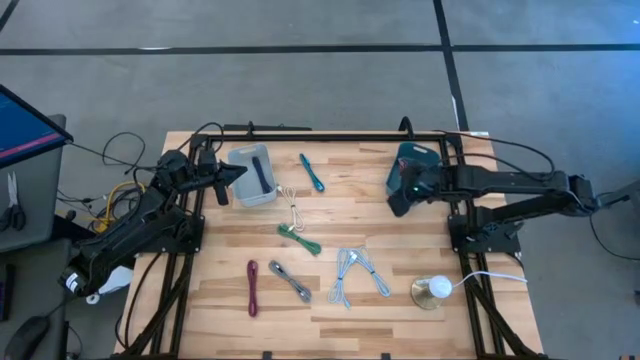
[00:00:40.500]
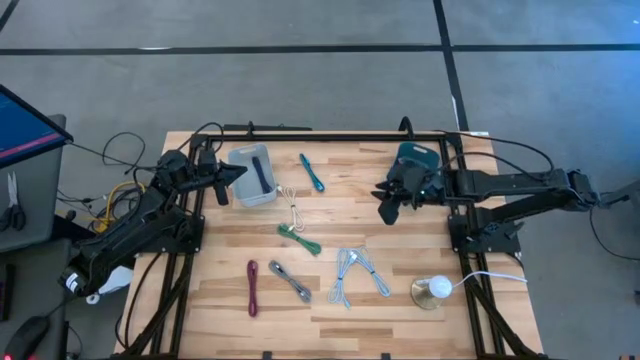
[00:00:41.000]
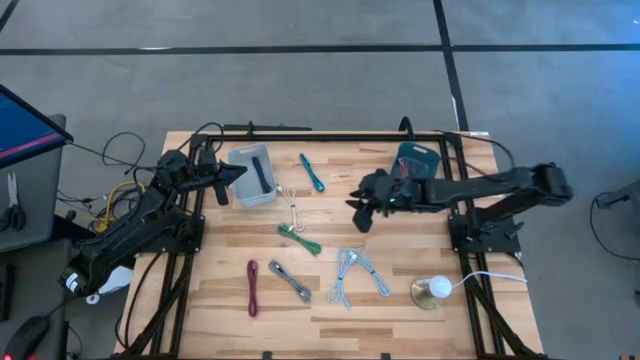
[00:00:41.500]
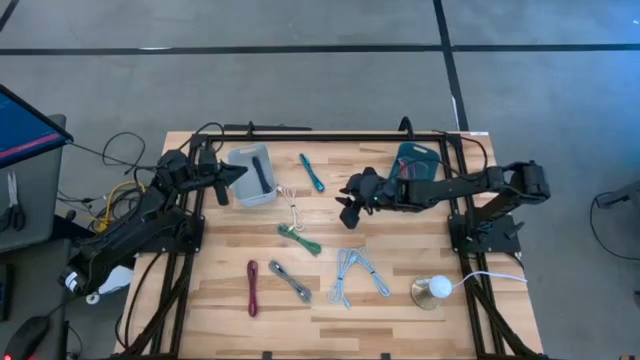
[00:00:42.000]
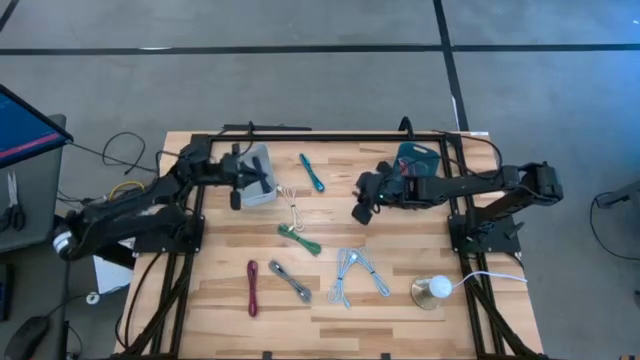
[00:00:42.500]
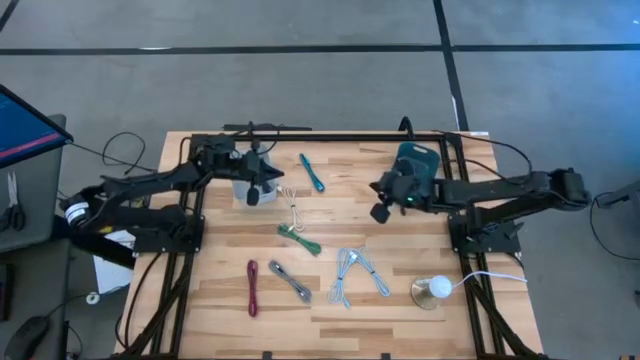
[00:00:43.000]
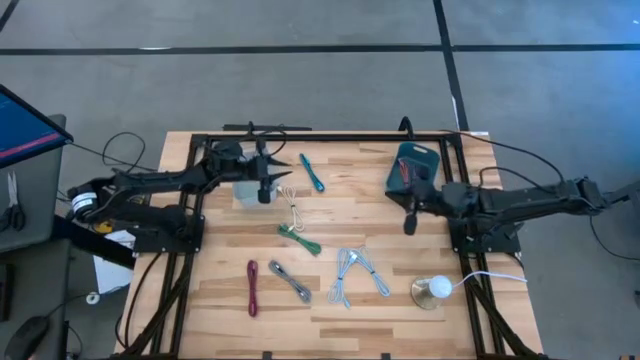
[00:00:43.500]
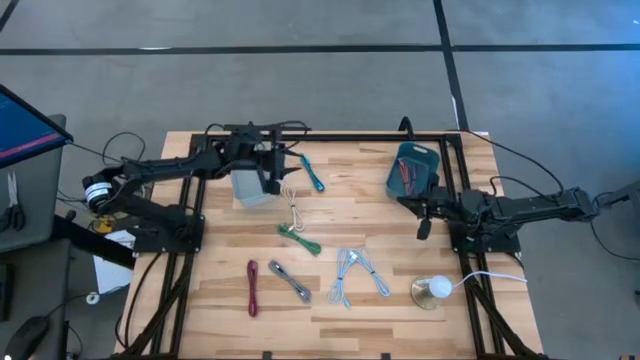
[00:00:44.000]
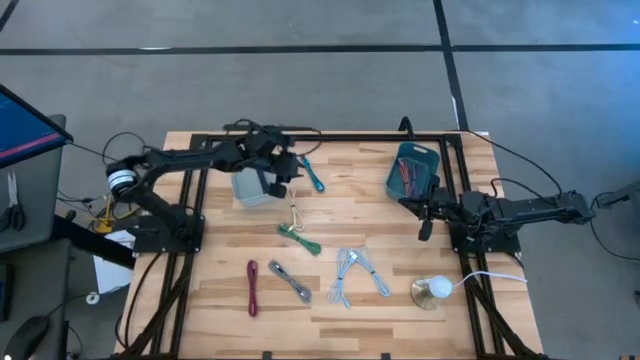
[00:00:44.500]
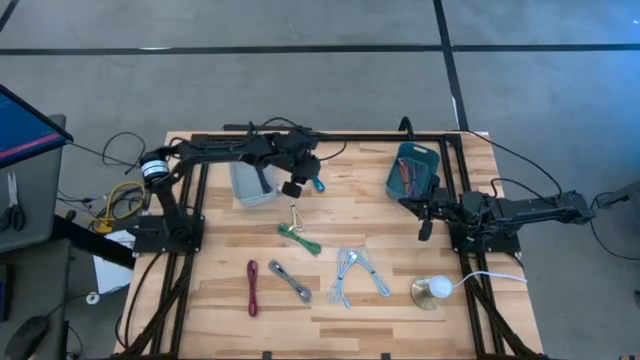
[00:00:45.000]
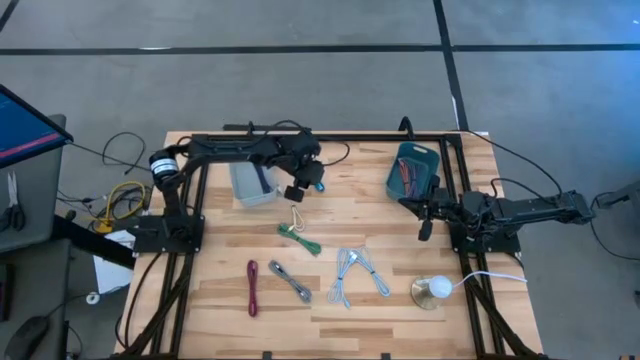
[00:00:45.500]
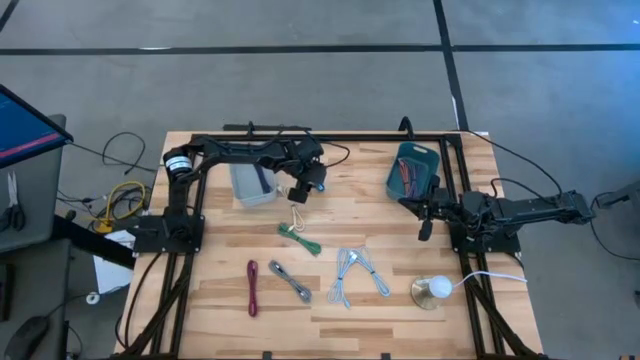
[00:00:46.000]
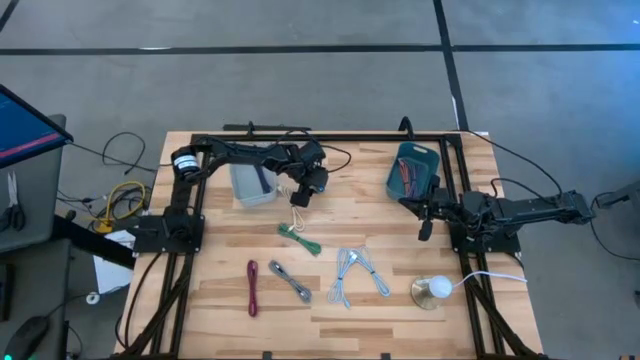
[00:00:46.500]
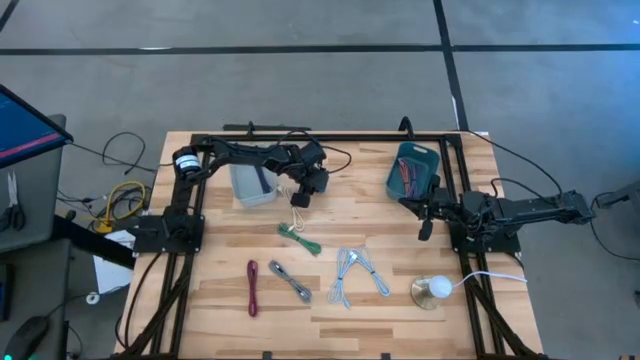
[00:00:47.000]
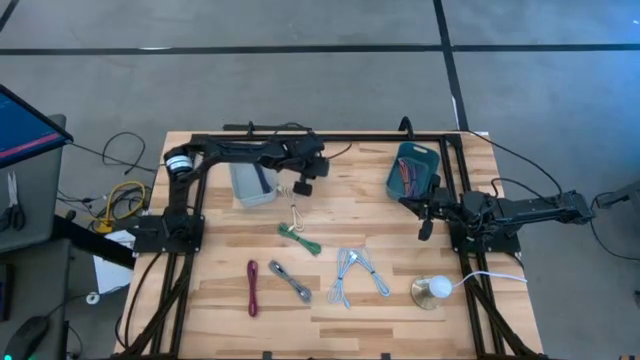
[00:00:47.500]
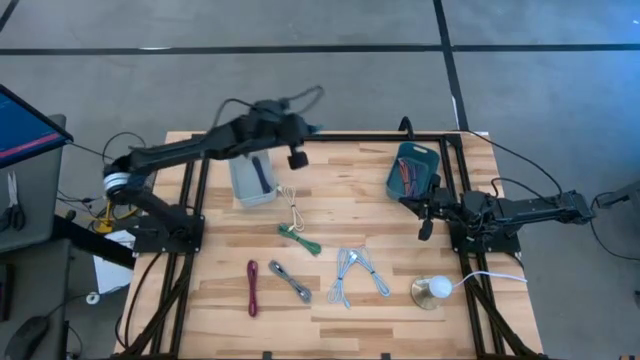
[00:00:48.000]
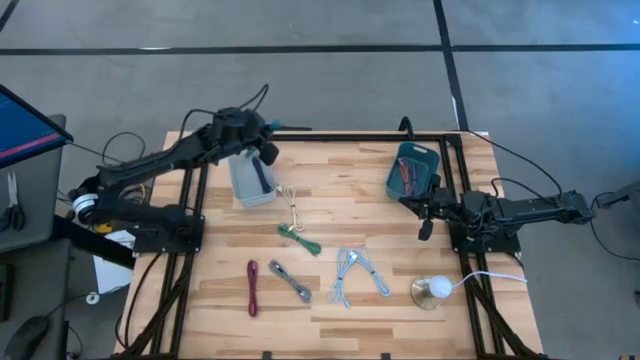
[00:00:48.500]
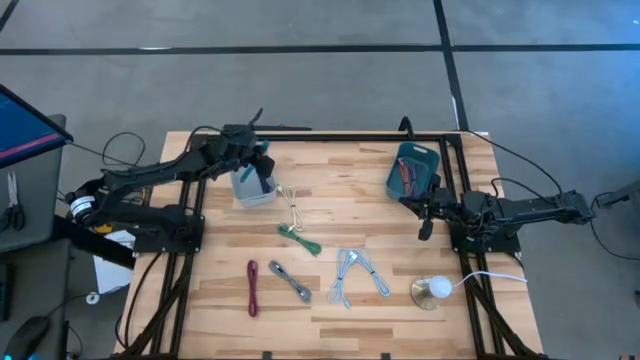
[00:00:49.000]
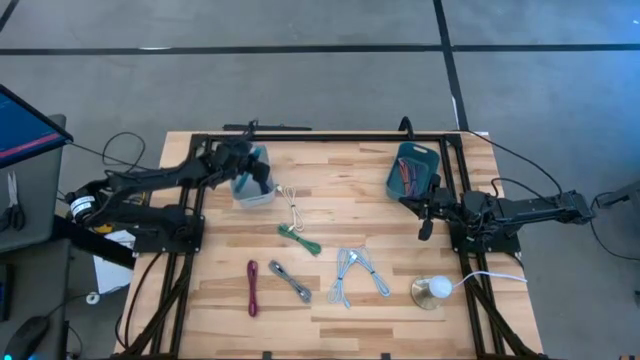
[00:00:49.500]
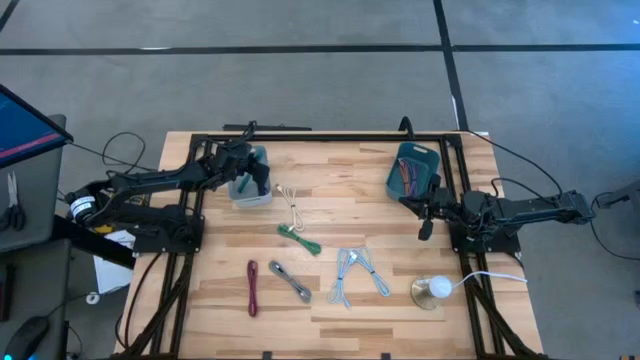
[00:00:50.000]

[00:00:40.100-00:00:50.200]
Task: Pick & Place USB Port
Put the green patterned USB cable into the gray bin

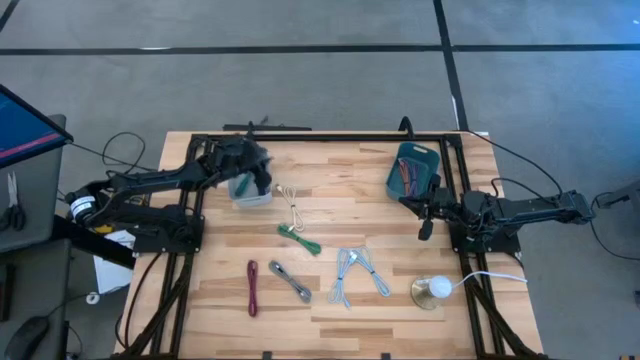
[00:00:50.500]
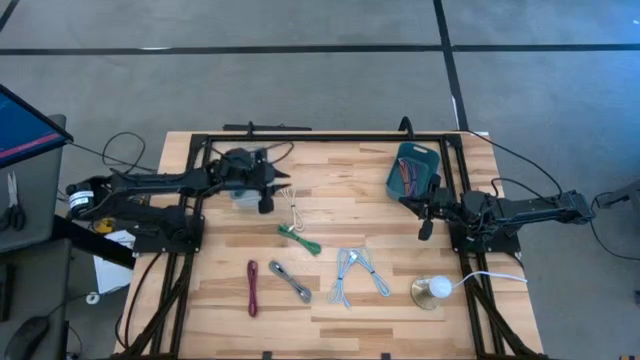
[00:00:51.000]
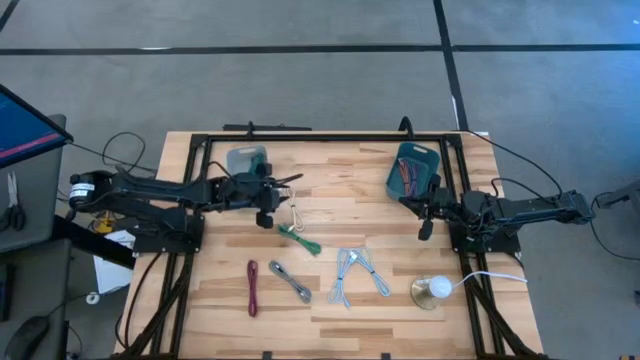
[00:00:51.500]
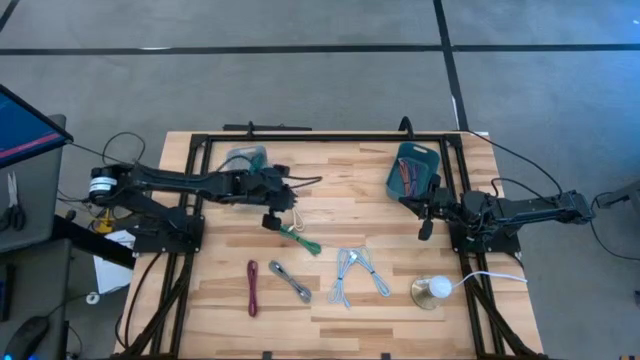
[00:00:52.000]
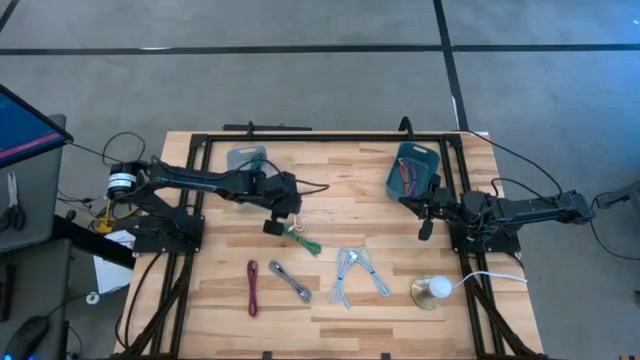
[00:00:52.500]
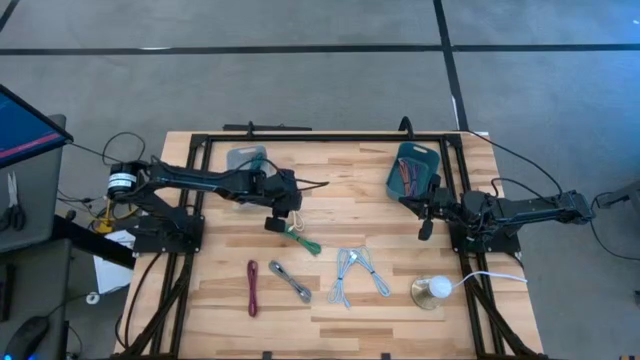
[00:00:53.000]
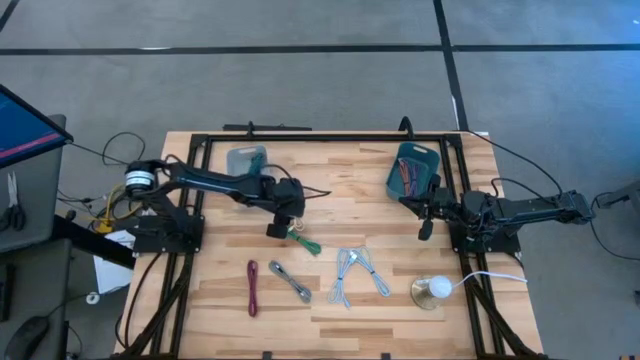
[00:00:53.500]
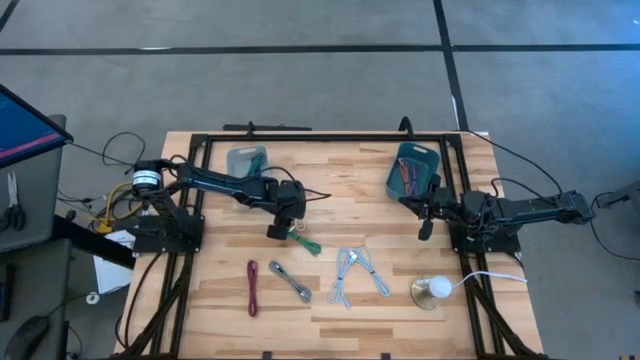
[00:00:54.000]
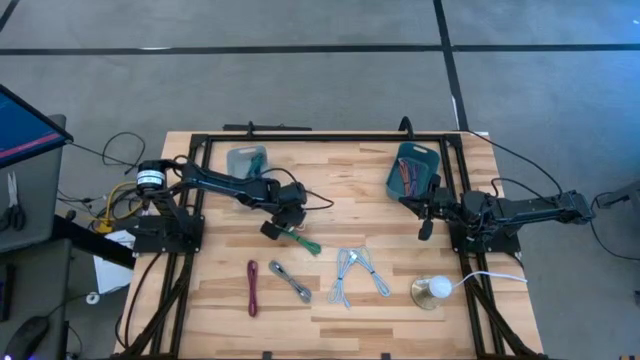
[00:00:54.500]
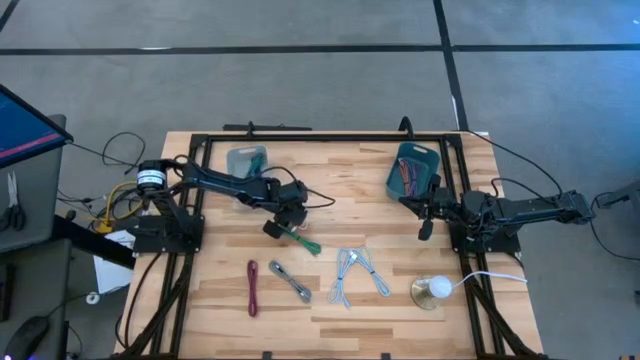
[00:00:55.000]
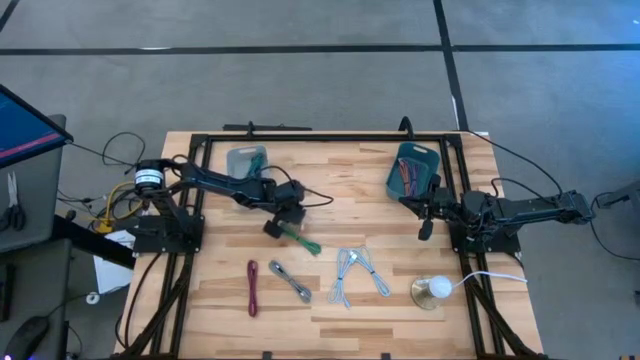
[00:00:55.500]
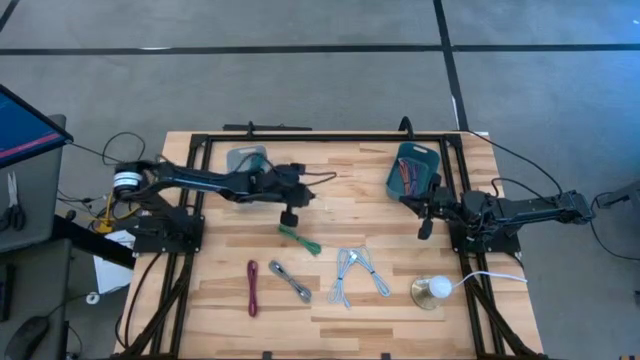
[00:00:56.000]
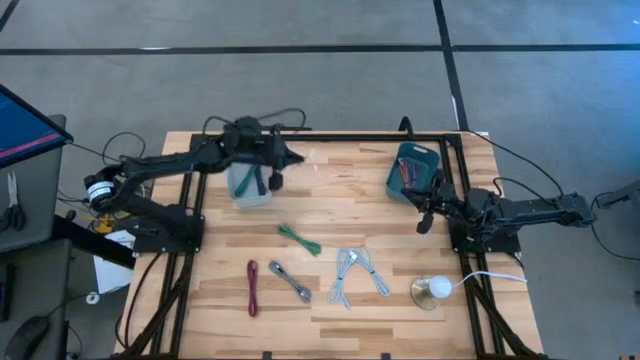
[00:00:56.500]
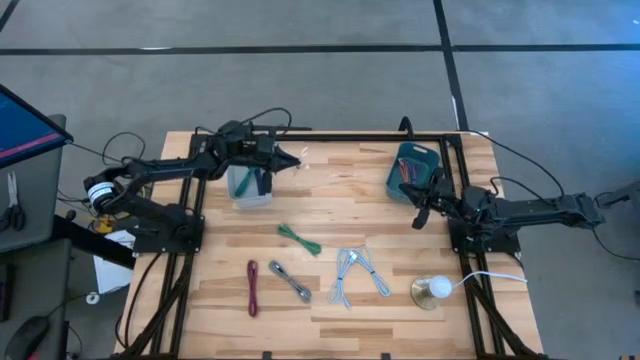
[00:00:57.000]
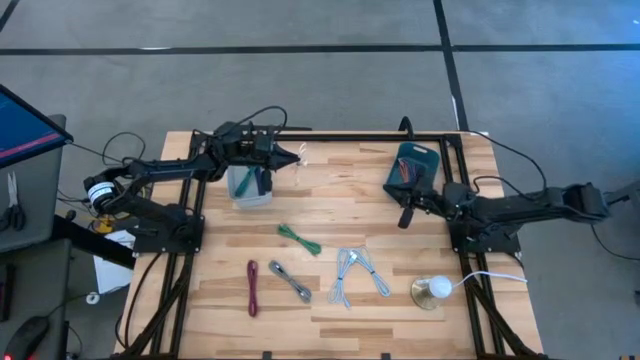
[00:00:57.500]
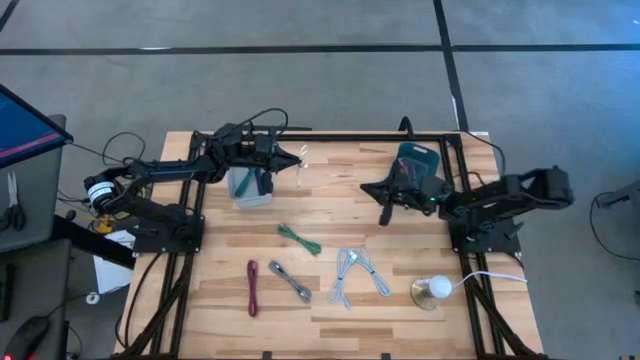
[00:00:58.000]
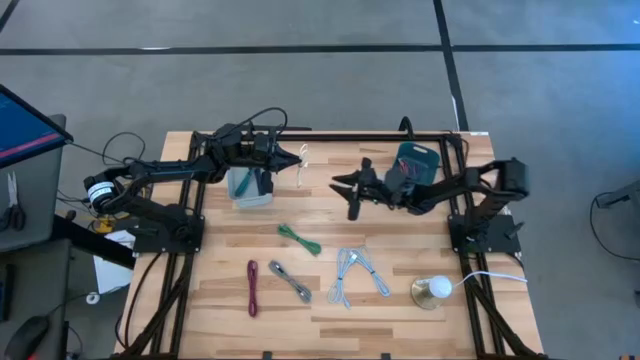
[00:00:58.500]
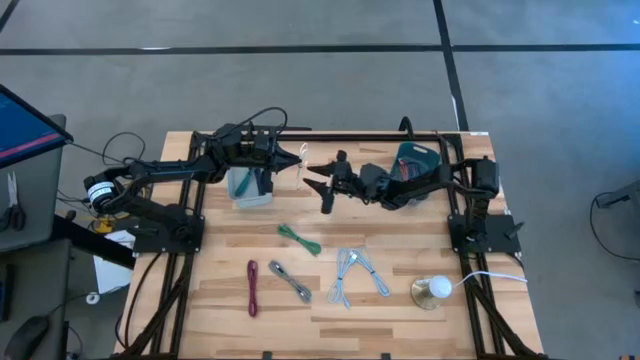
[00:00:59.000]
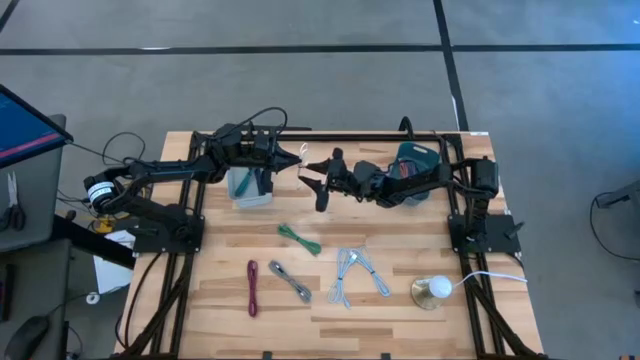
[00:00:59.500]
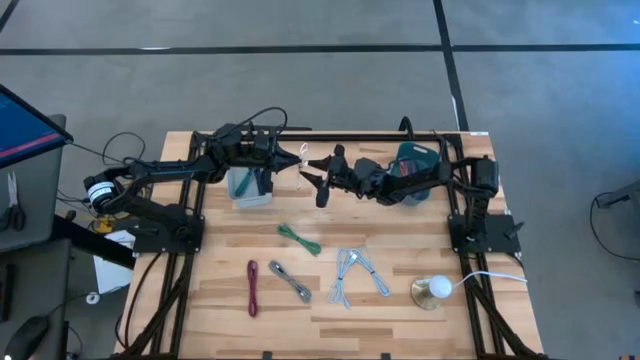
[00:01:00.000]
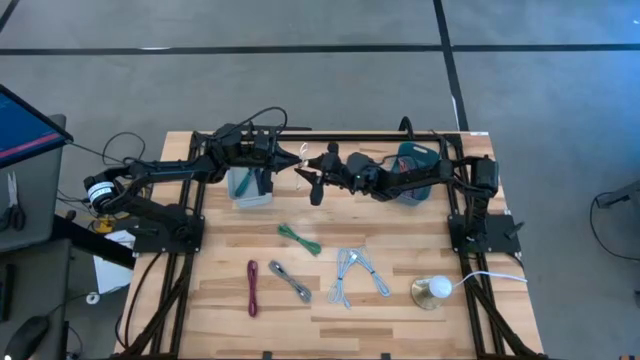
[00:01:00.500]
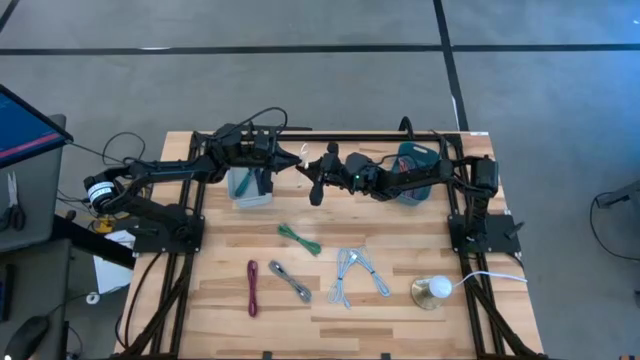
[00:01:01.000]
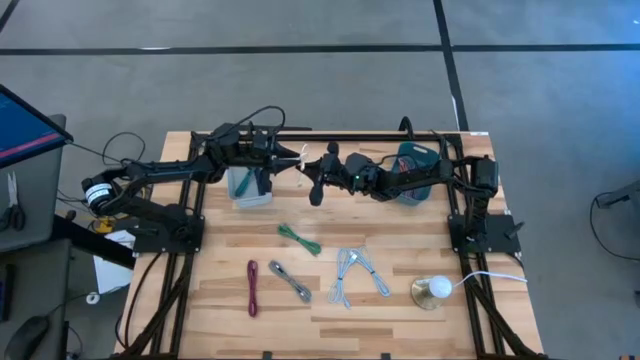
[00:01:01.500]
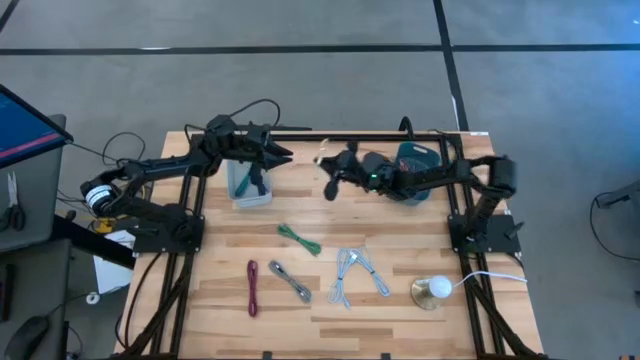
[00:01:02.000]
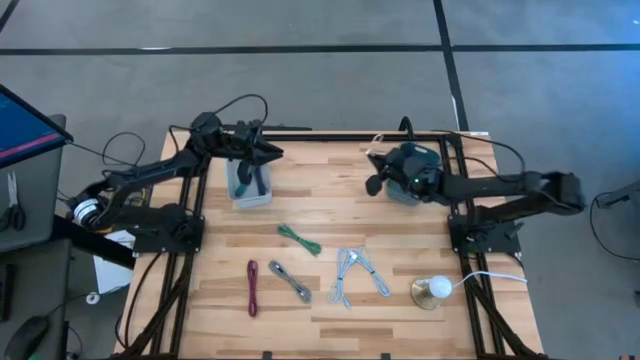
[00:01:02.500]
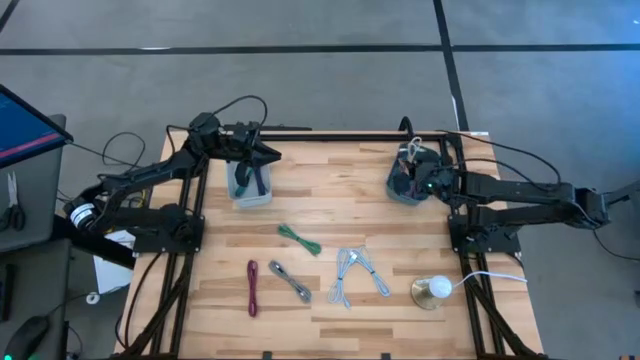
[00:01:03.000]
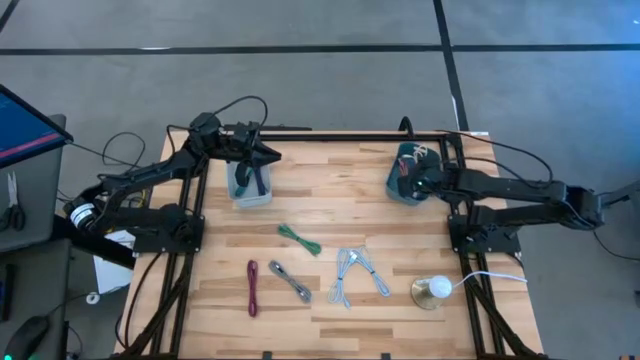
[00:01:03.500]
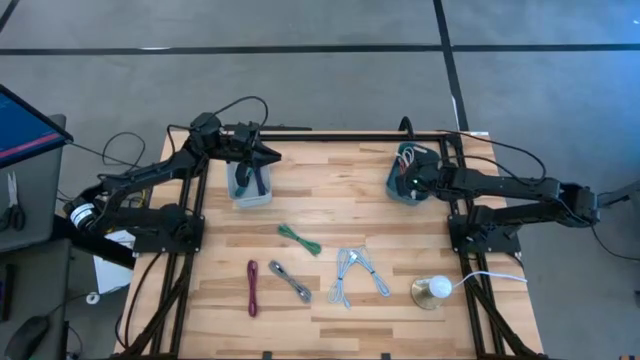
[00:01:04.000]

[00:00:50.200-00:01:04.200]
Put the white USB cable into the blue bin
